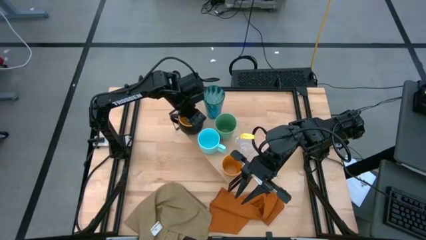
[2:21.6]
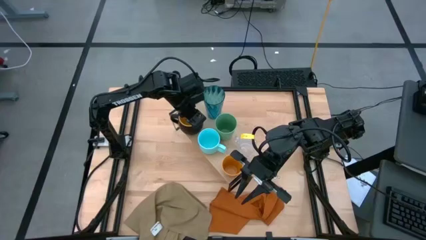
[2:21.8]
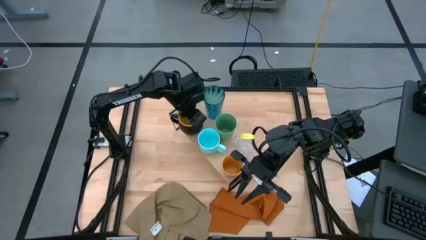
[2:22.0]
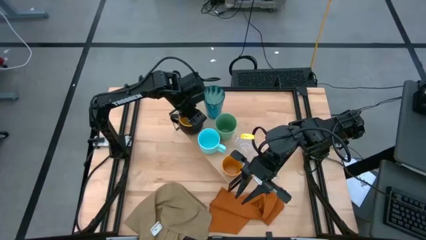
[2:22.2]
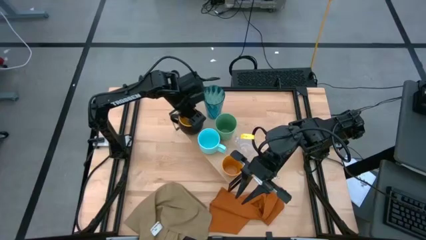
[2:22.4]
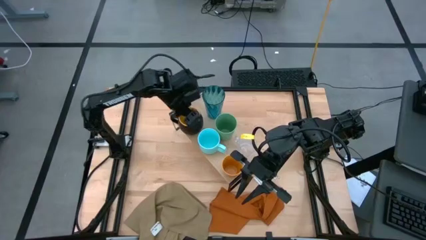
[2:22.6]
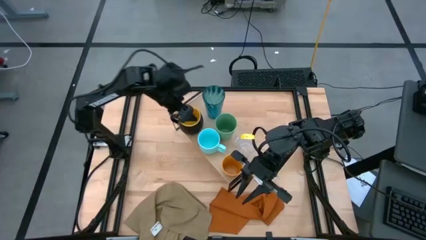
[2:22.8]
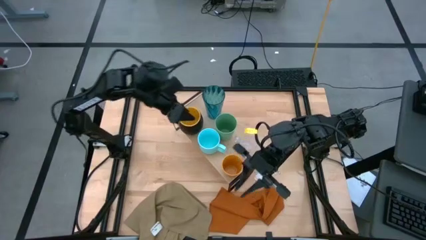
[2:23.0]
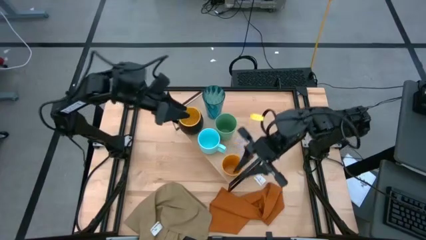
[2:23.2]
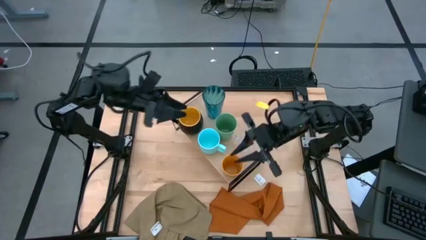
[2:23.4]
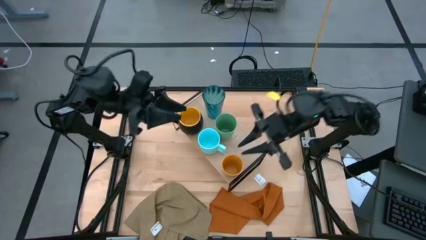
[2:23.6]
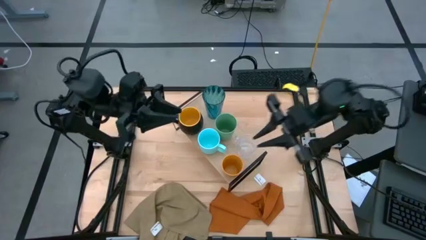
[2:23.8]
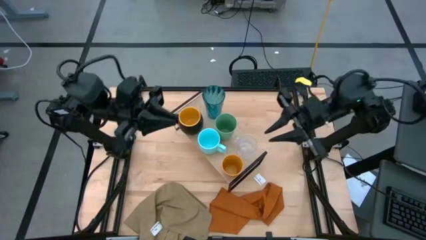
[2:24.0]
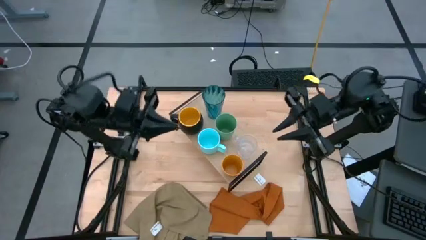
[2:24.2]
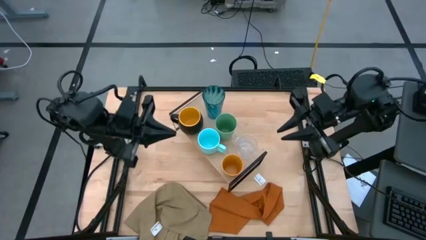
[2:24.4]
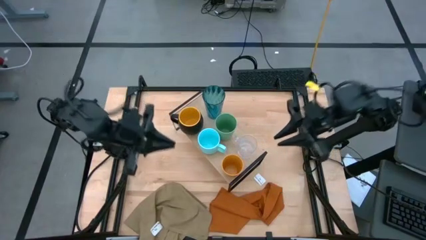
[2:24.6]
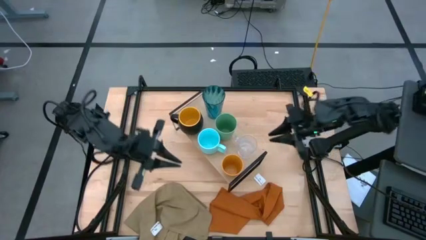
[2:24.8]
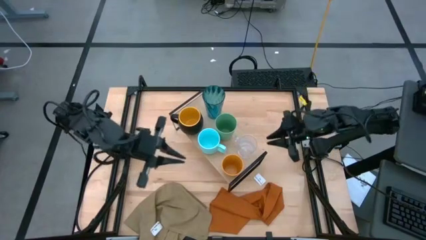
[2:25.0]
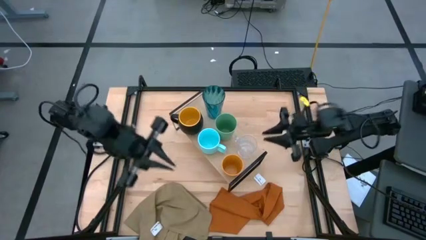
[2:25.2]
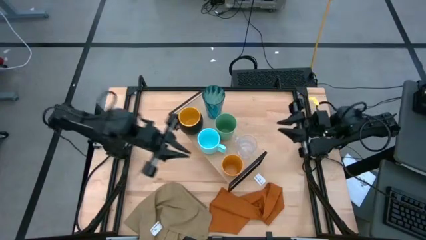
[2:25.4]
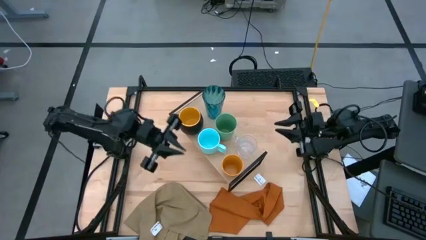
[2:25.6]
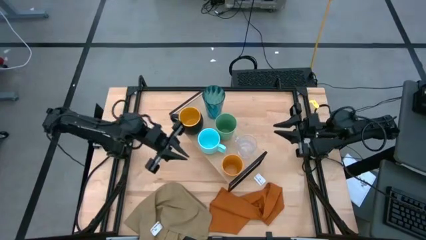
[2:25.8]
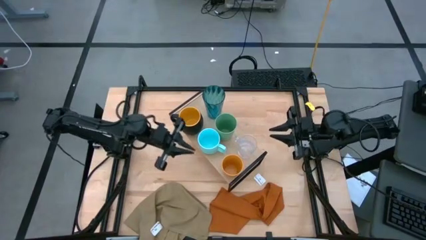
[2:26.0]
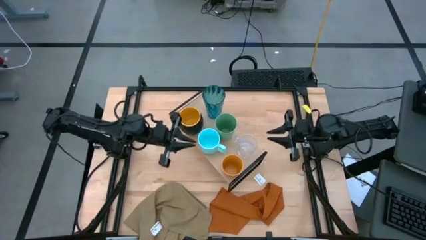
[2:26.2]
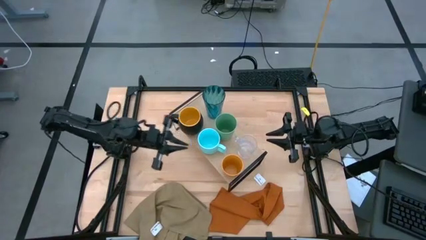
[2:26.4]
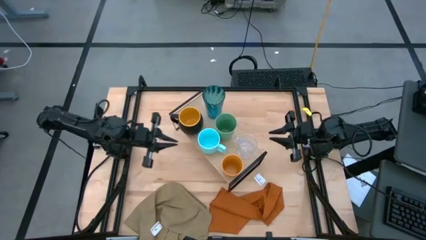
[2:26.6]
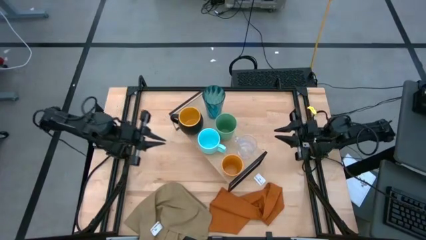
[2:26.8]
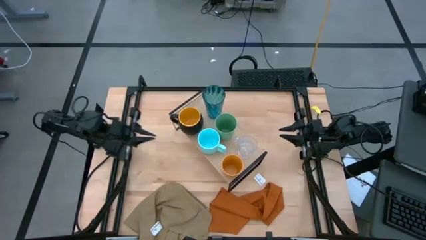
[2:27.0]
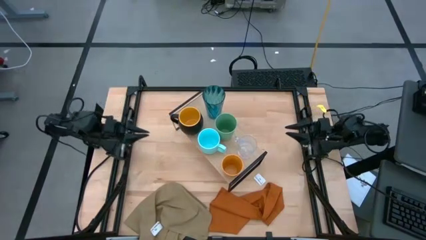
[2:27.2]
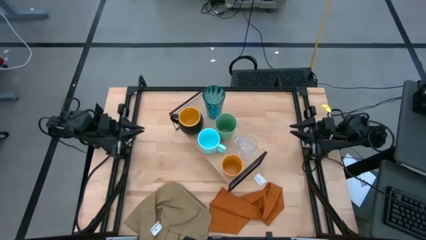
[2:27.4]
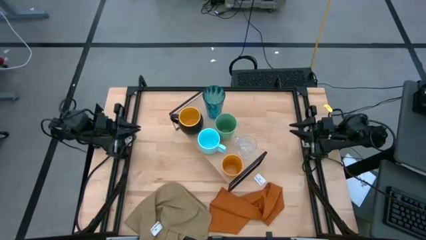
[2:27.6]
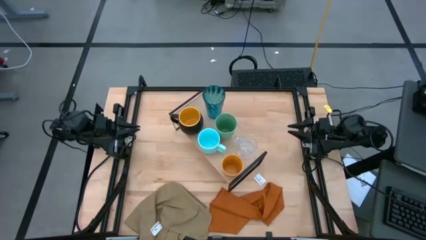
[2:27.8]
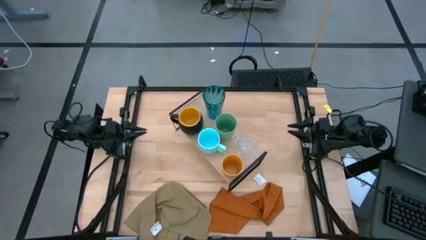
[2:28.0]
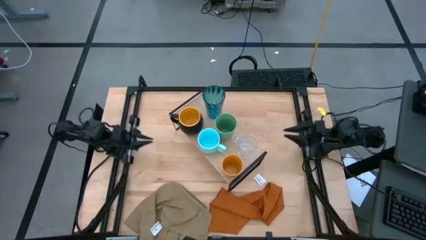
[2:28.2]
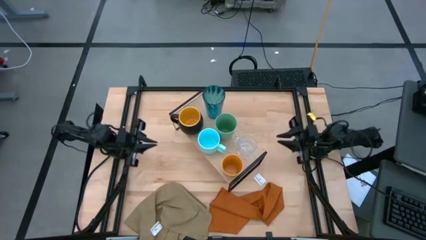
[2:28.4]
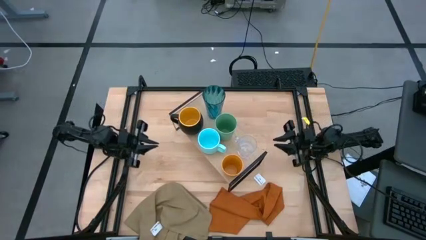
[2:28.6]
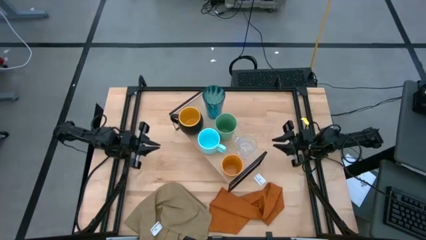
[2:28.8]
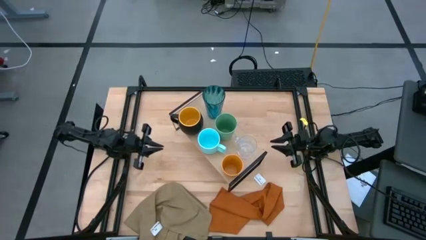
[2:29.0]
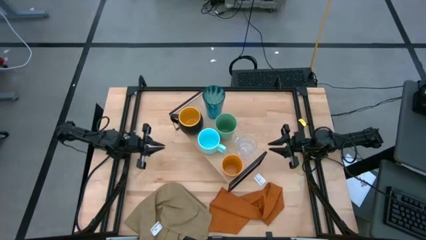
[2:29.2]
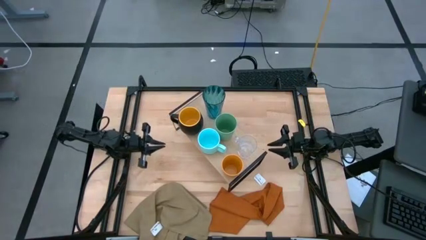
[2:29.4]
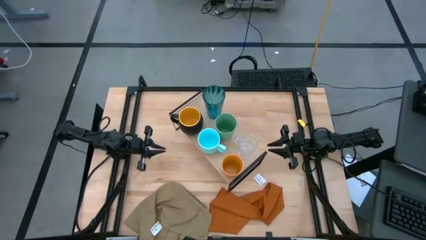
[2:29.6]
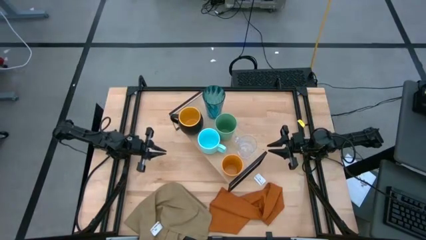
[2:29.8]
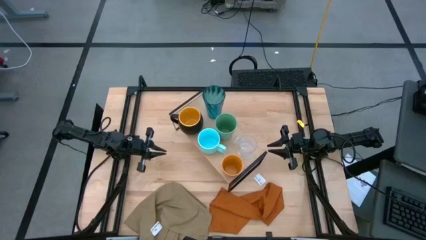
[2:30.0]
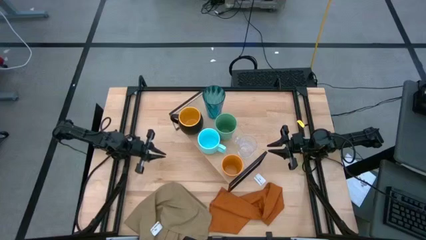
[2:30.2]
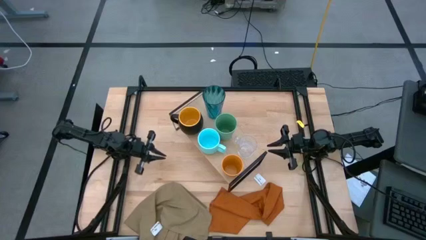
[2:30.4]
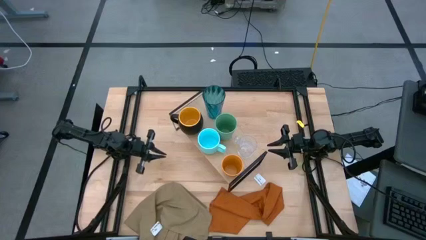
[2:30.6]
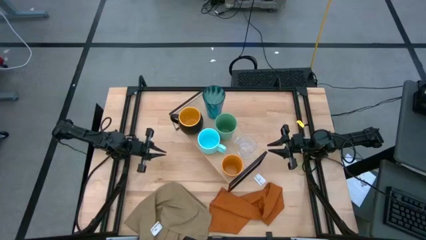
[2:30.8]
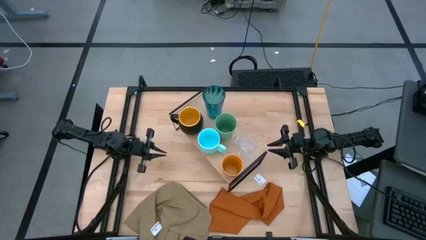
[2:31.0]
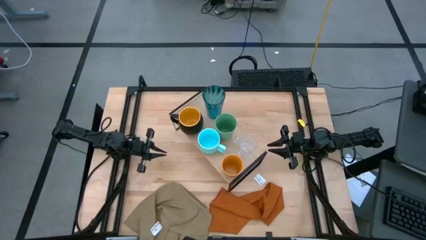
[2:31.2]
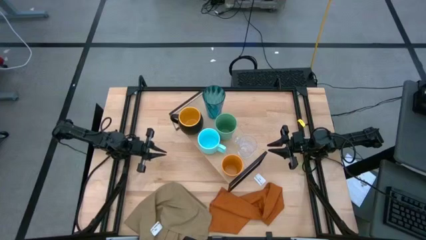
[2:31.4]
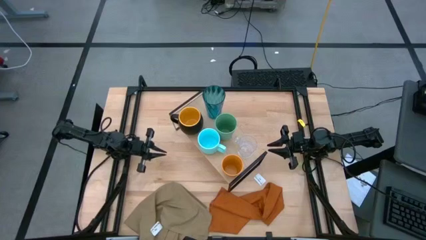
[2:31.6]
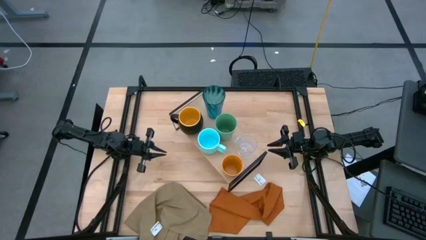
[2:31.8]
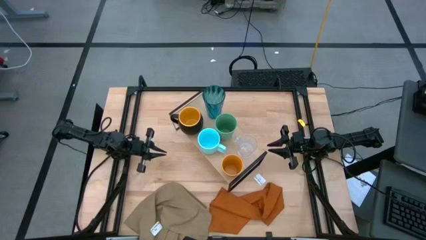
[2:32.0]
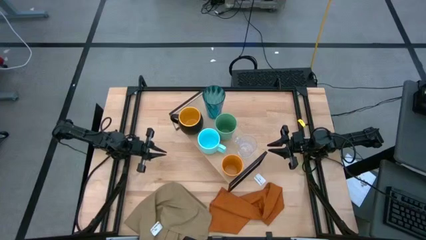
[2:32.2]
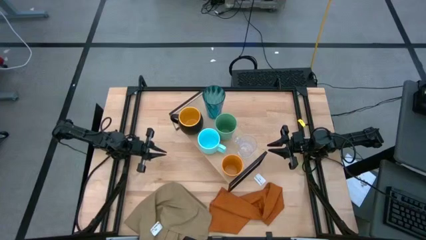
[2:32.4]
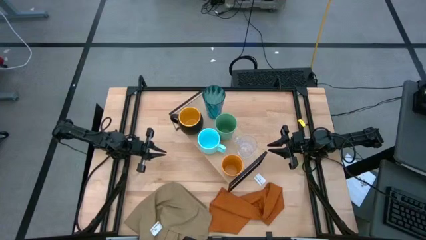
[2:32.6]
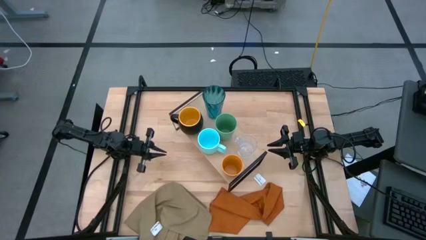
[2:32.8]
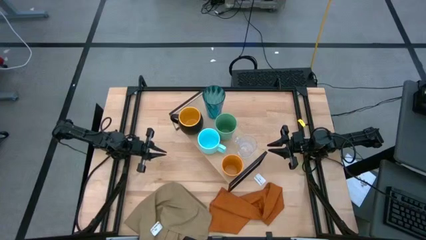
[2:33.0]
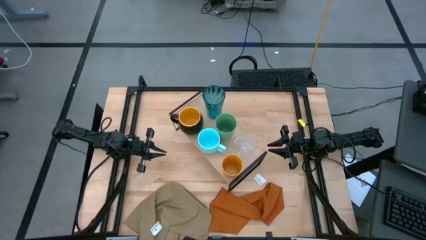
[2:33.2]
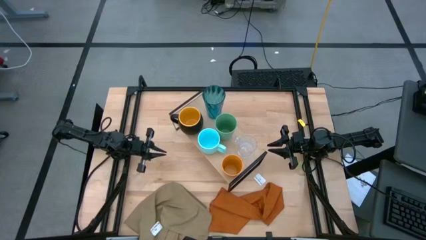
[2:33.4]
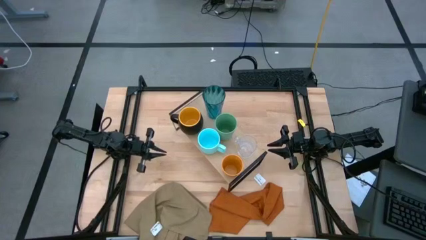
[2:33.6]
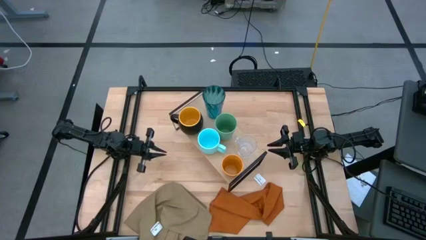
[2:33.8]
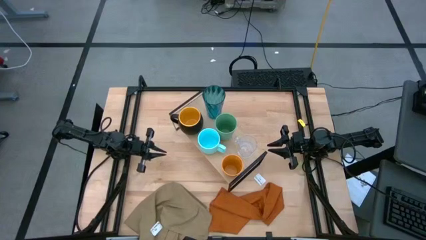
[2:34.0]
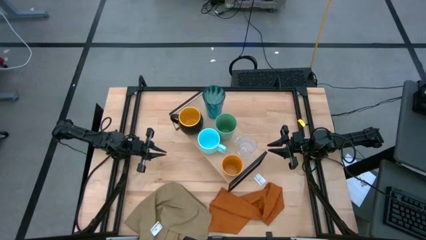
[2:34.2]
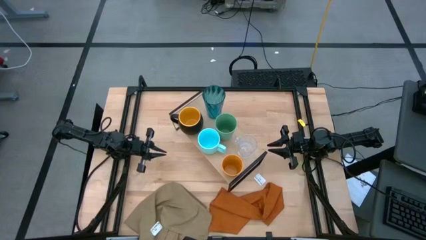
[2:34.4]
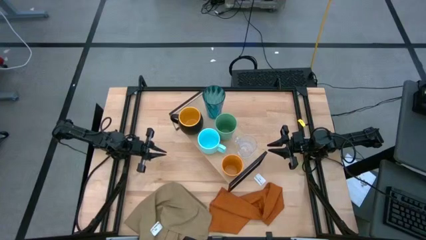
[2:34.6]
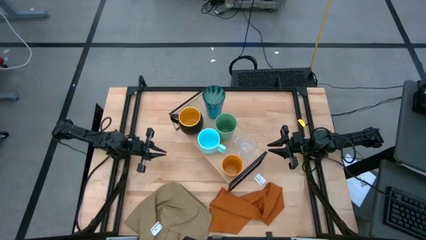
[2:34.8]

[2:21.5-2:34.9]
Task: Stack small to large cups/mugs on shelf
Return to home position

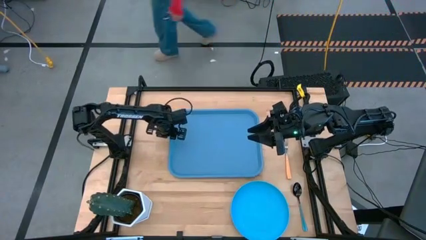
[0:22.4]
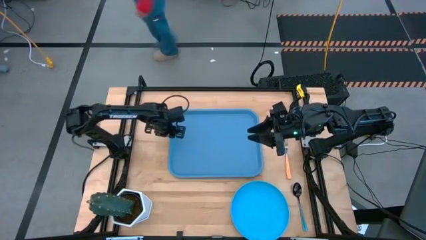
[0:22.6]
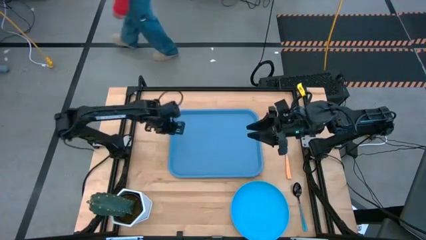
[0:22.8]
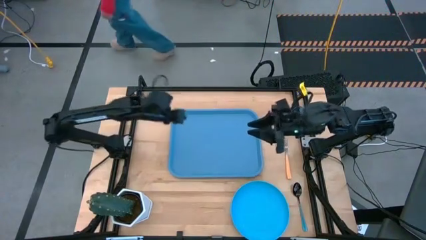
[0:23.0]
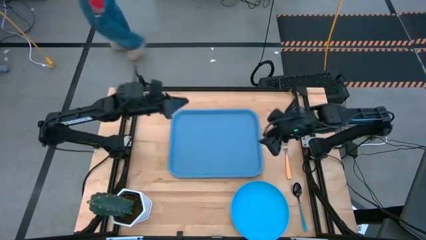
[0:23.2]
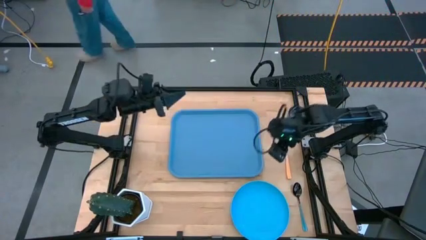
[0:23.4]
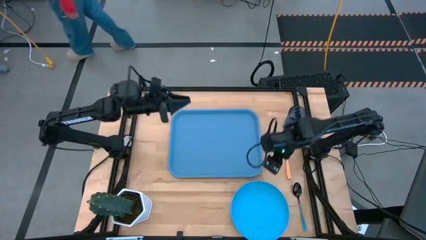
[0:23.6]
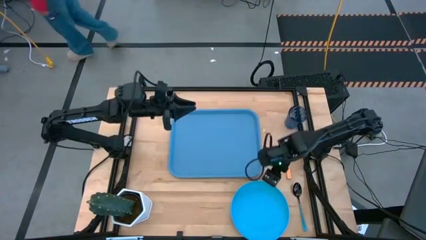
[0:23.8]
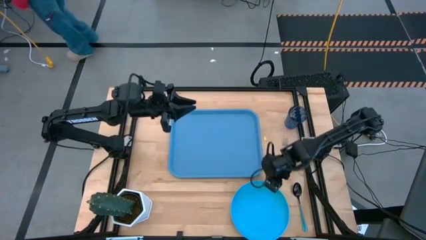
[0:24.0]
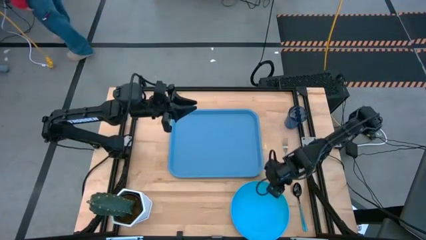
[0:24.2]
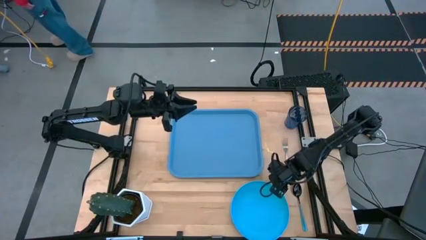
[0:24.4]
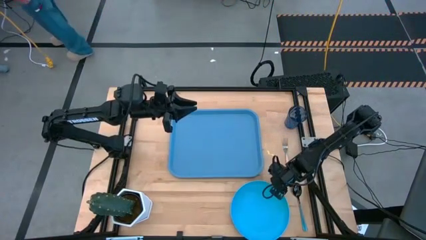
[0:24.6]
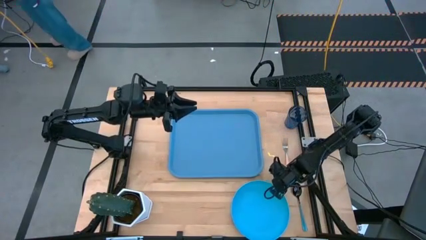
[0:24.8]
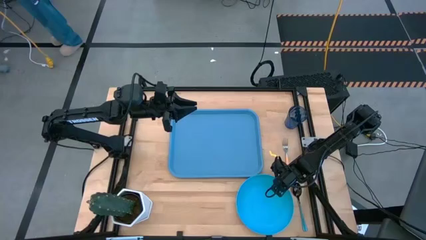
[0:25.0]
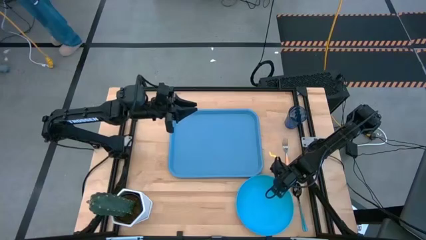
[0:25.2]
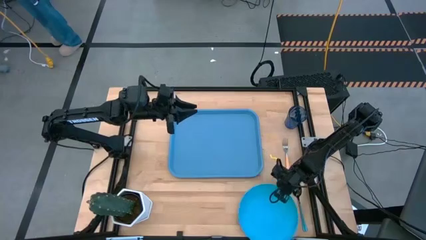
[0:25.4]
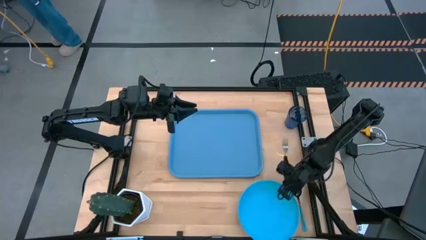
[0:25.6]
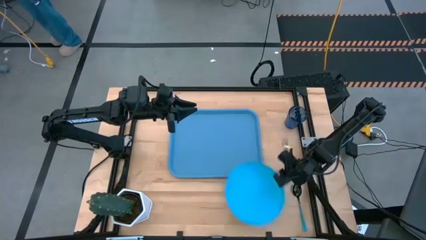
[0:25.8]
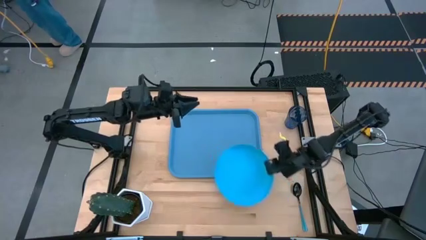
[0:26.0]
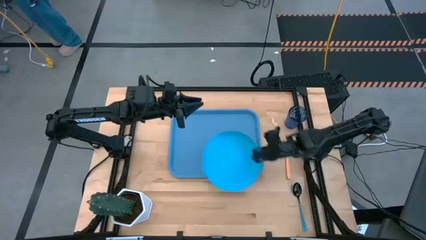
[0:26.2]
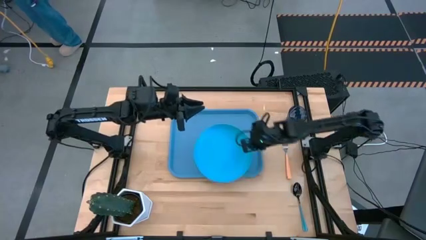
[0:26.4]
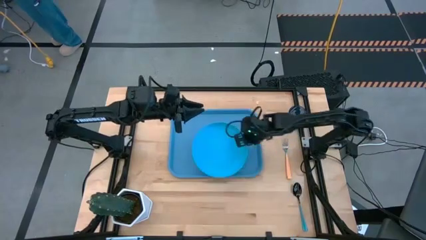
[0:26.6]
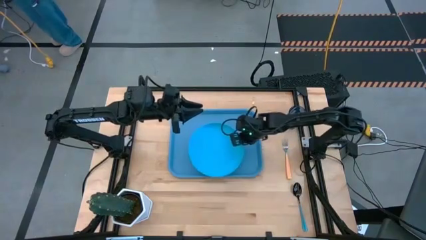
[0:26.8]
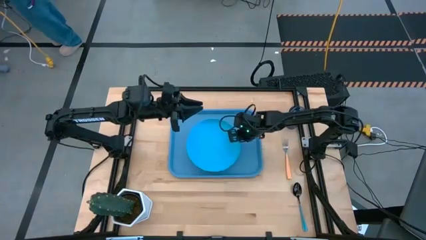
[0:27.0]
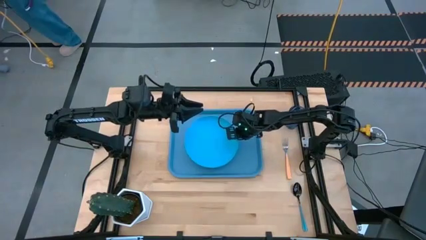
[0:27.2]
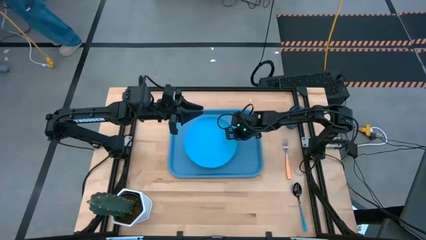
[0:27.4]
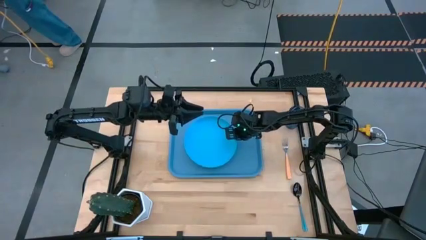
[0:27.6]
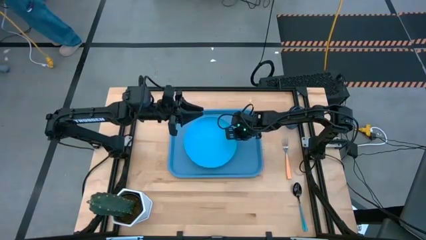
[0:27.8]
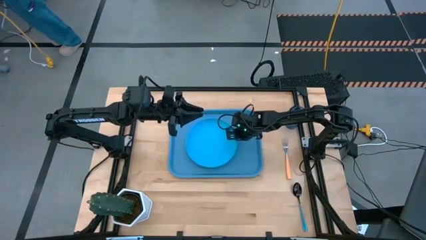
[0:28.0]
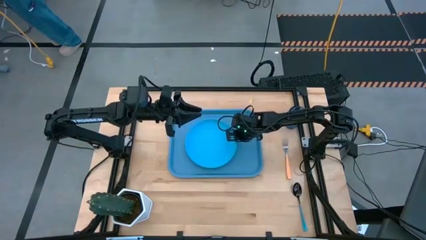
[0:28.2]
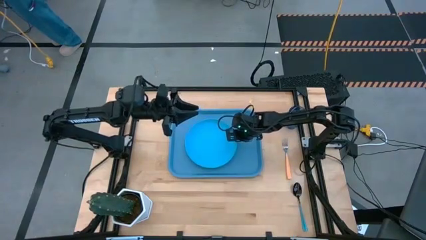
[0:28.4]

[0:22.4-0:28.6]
Task: Pick and place plate/cup/fork/spoon on tray
Put the blue plate on the blue serving tray
